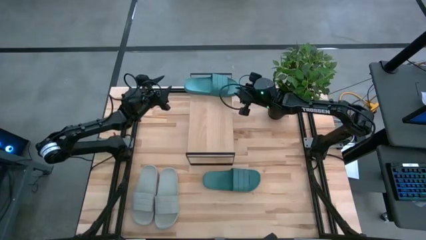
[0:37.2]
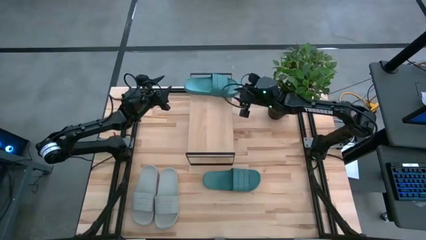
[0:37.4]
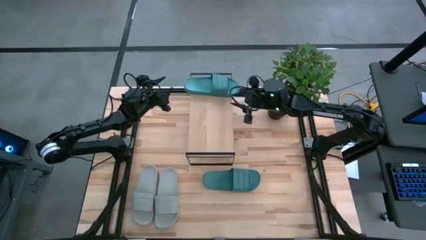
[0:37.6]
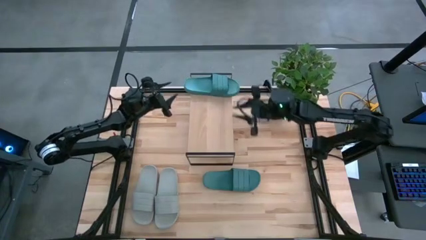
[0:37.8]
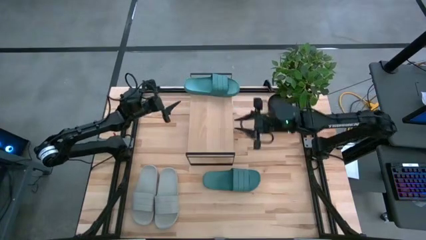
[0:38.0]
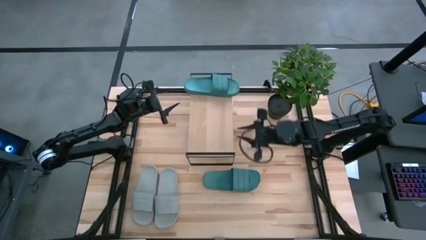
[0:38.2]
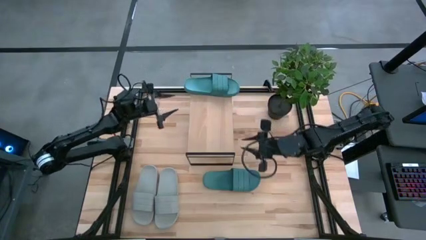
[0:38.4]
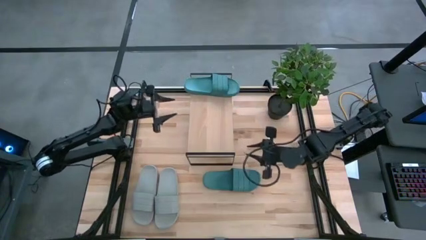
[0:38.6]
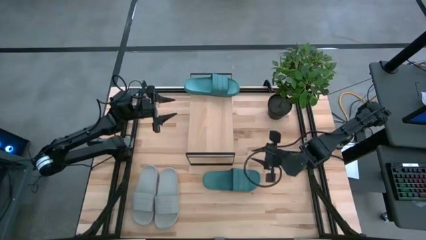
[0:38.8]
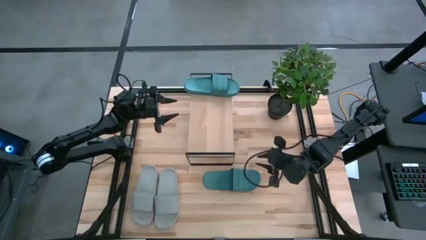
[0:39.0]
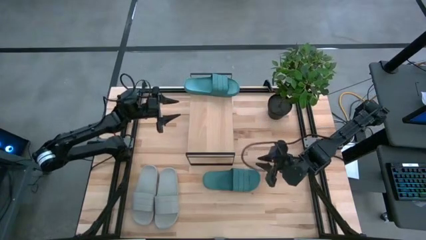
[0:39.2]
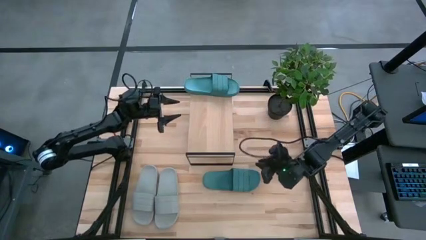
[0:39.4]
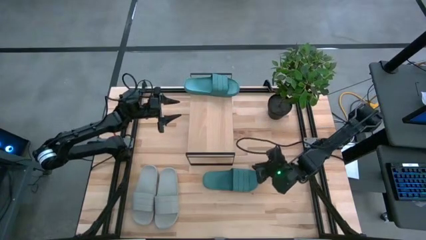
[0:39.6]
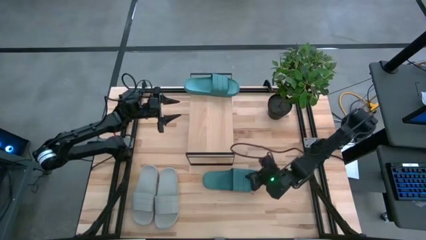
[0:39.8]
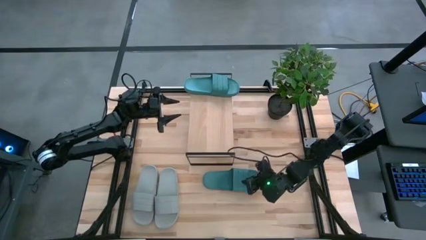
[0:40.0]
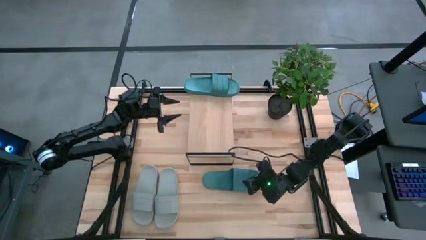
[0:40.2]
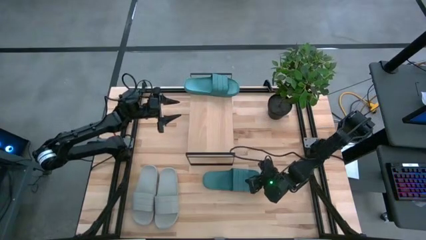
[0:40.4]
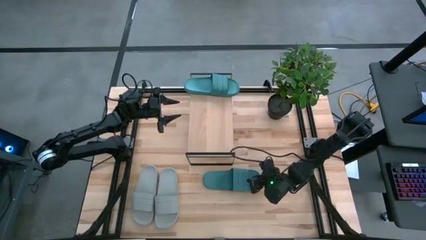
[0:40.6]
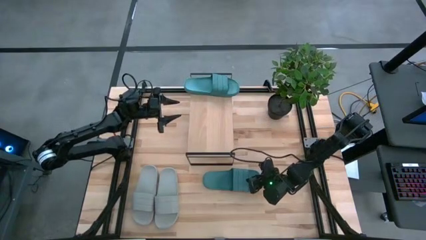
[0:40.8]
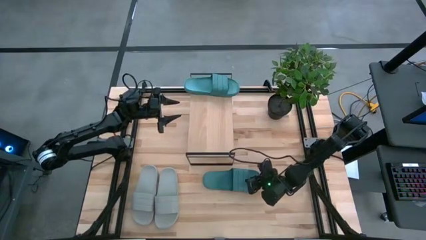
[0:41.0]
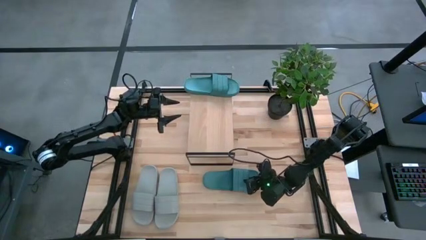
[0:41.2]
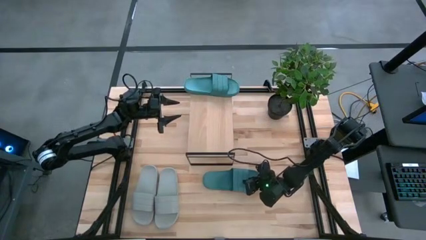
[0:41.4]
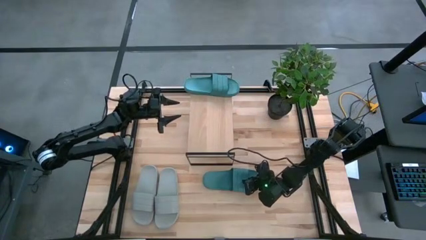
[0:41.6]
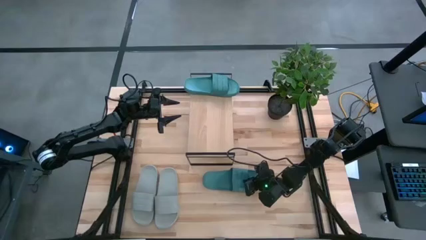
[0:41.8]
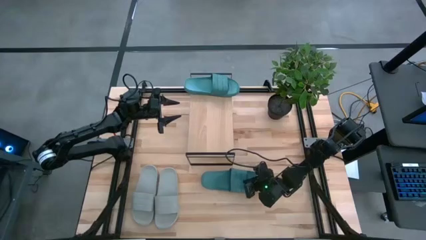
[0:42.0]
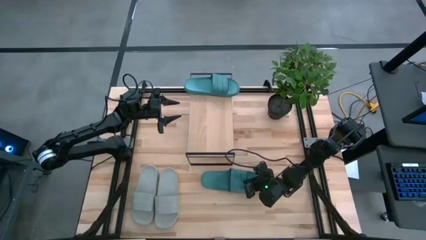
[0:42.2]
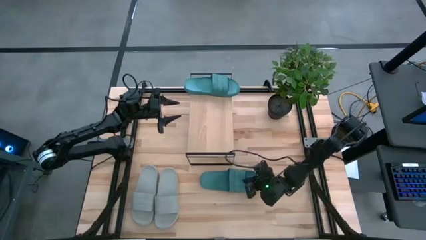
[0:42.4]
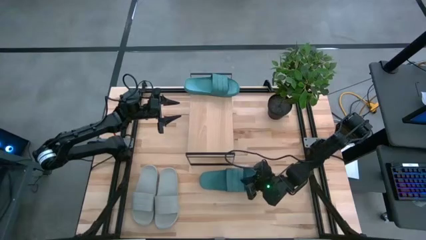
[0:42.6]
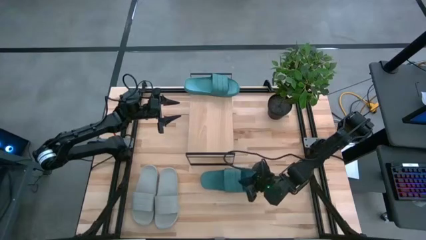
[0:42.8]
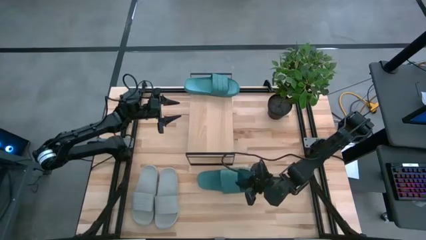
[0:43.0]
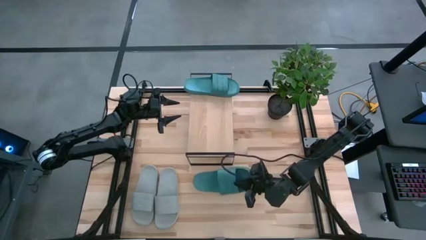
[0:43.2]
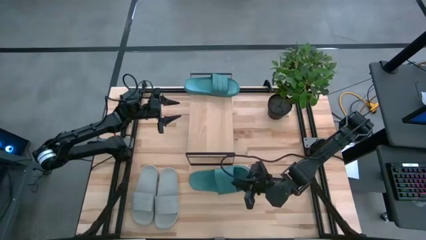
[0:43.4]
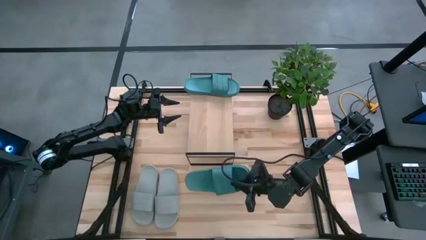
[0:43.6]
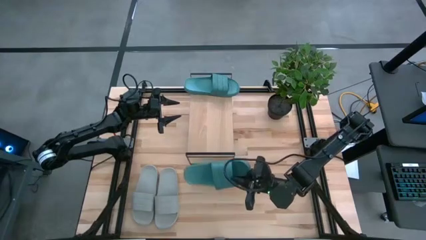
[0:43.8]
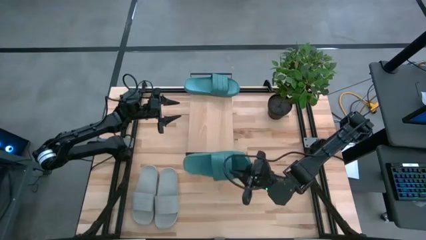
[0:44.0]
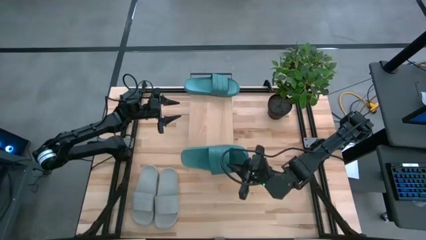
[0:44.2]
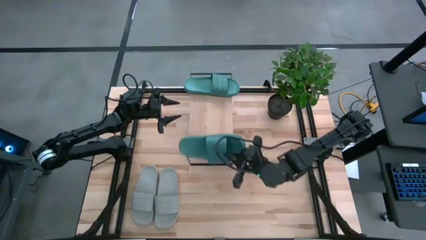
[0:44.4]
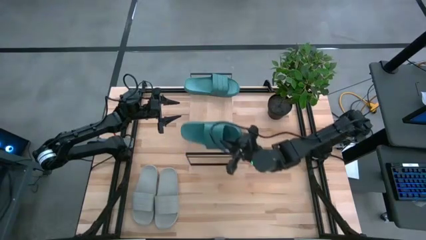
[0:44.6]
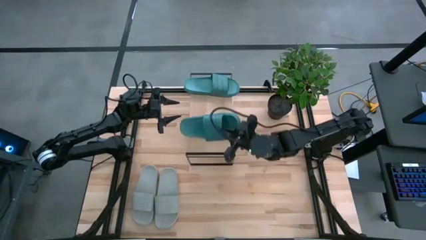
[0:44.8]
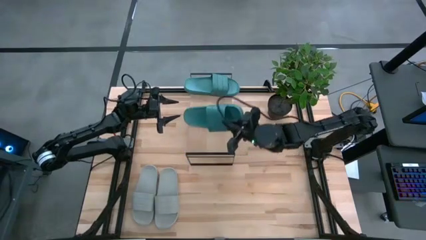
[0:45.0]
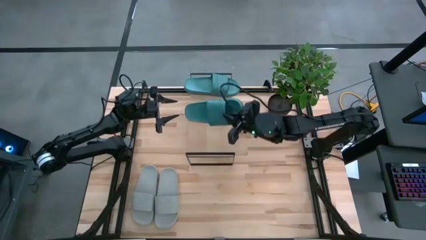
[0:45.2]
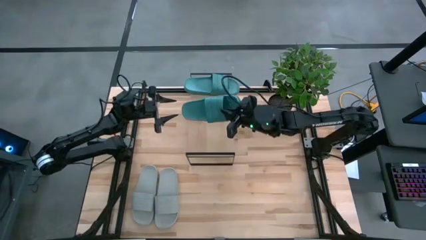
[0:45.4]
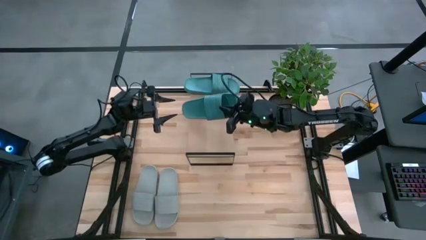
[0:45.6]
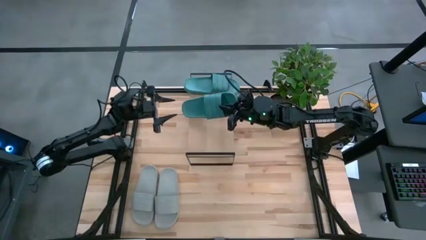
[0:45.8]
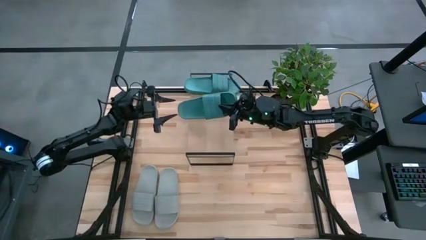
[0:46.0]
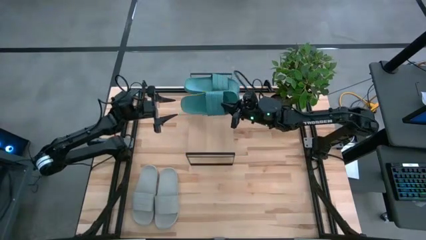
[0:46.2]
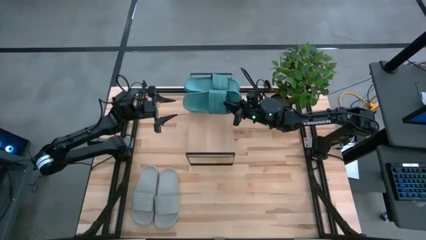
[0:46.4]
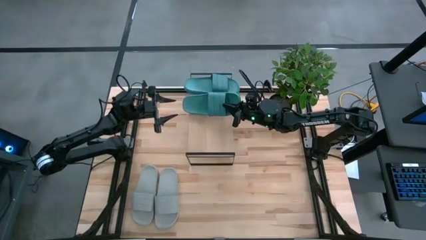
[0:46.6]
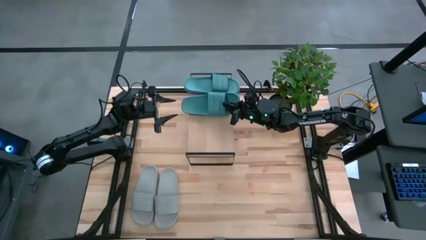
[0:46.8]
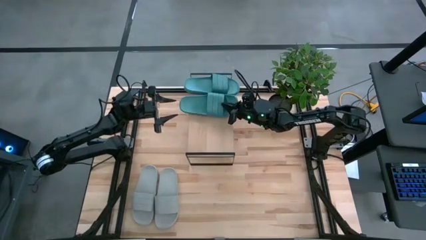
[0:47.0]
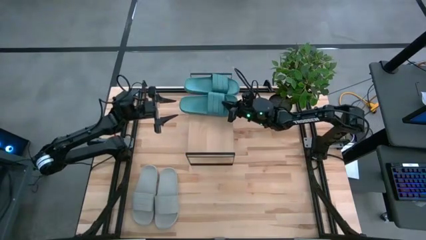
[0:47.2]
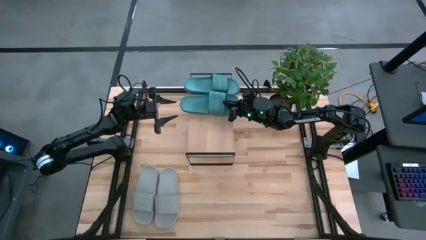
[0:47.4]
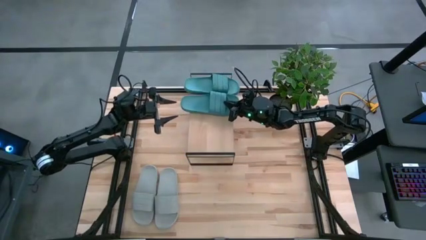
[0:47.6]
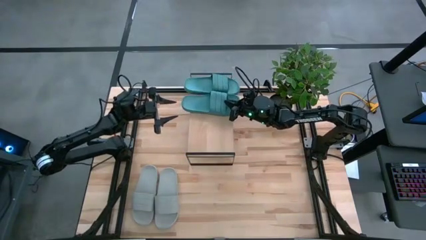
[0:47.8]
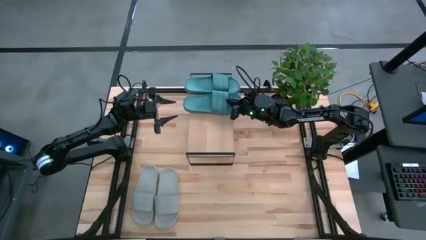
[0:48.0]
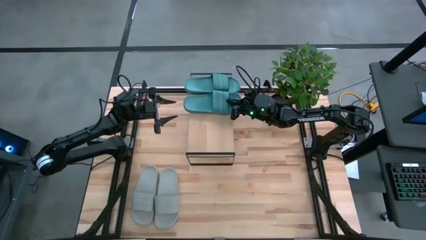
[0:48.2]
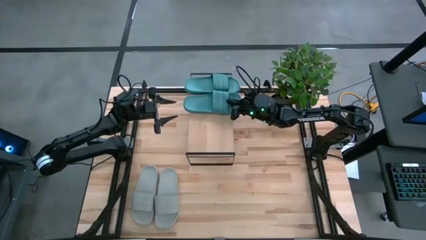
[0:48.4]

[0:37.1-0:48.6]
Task: Pick and place slides into the shelf
Put the green slide on the shelf

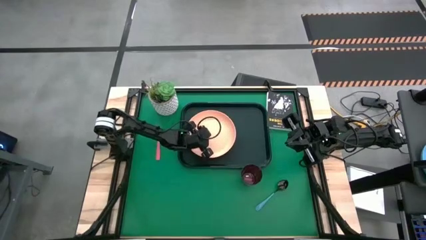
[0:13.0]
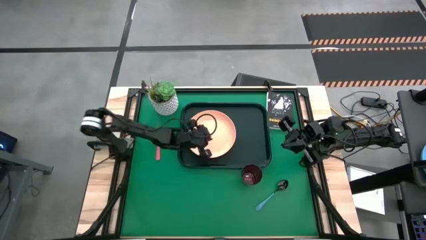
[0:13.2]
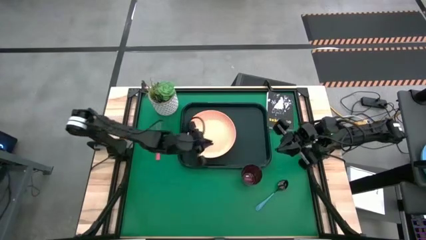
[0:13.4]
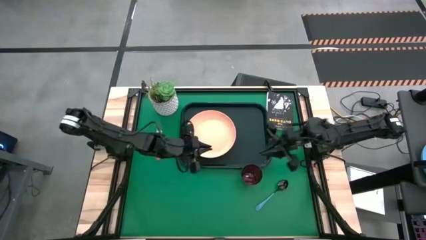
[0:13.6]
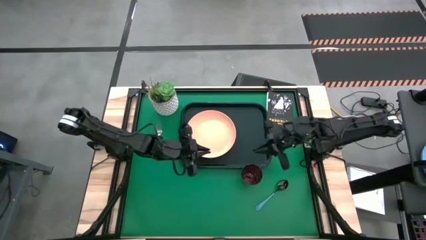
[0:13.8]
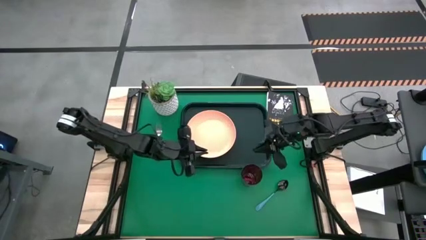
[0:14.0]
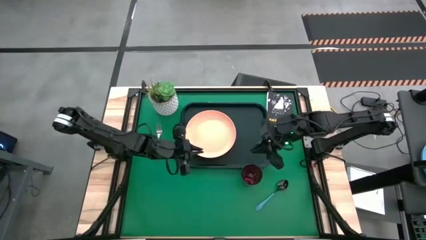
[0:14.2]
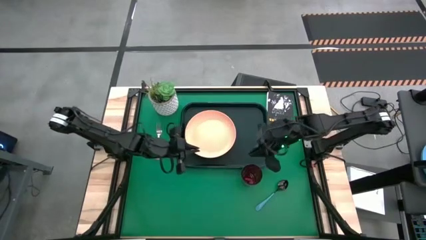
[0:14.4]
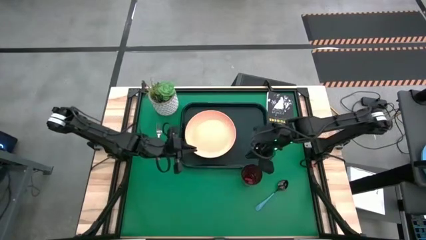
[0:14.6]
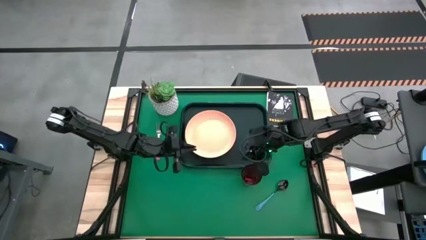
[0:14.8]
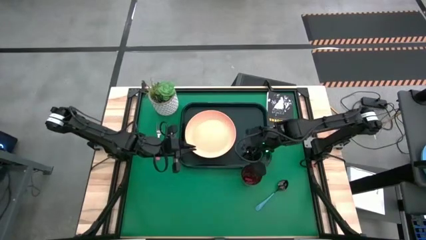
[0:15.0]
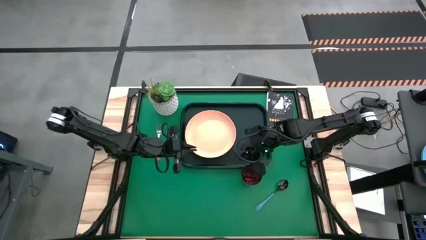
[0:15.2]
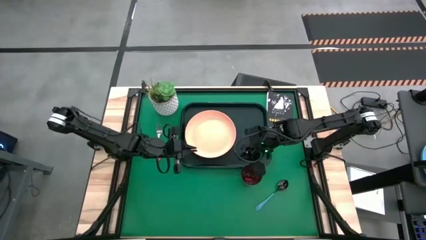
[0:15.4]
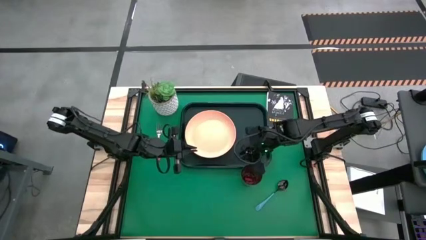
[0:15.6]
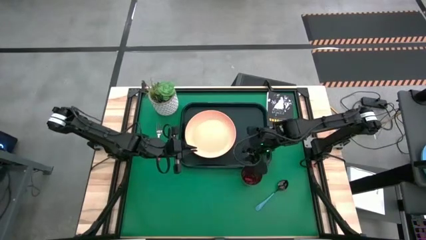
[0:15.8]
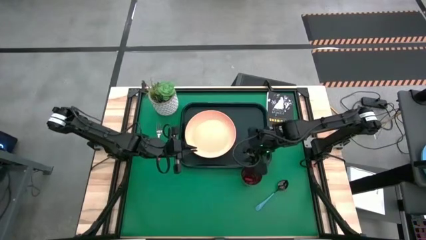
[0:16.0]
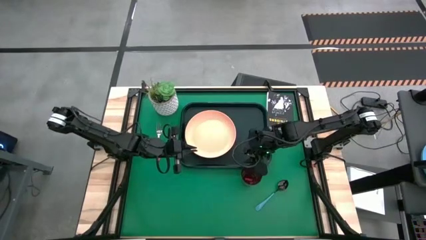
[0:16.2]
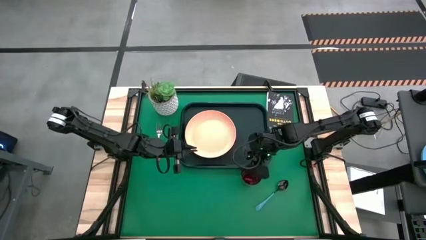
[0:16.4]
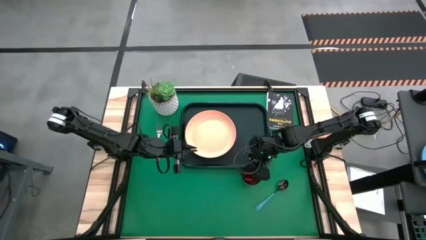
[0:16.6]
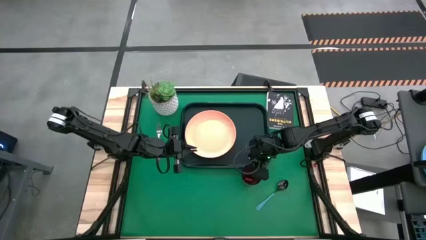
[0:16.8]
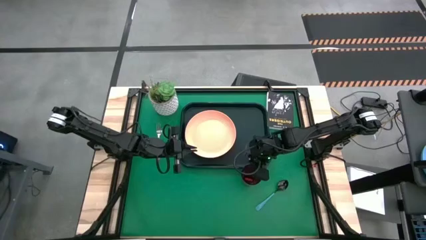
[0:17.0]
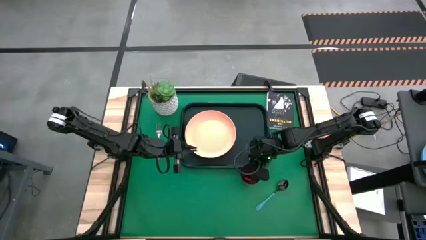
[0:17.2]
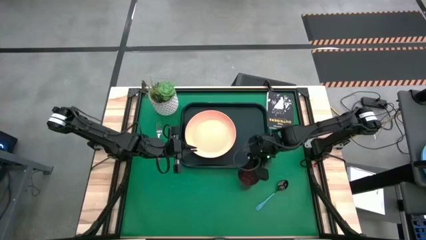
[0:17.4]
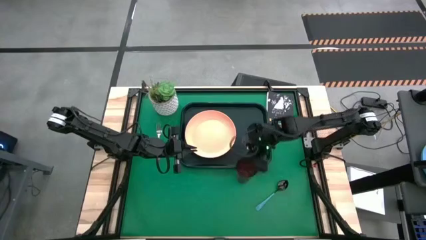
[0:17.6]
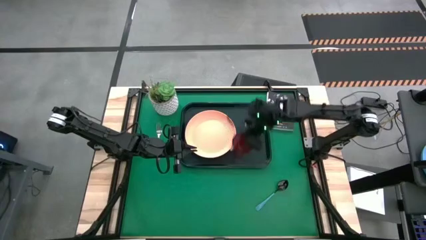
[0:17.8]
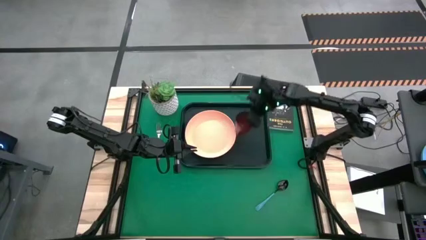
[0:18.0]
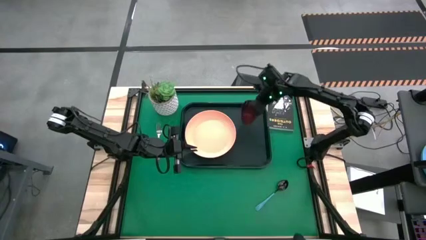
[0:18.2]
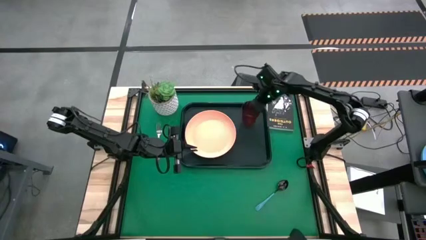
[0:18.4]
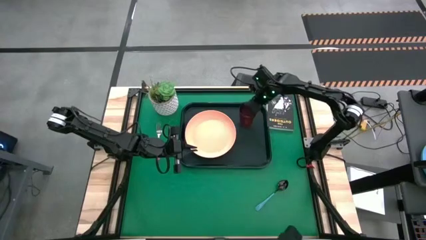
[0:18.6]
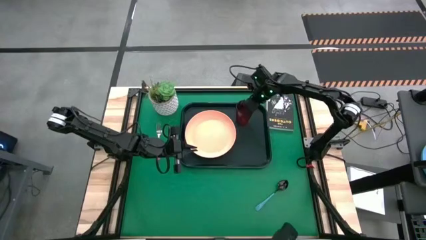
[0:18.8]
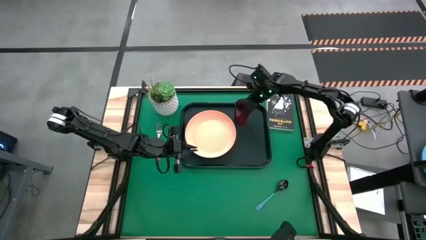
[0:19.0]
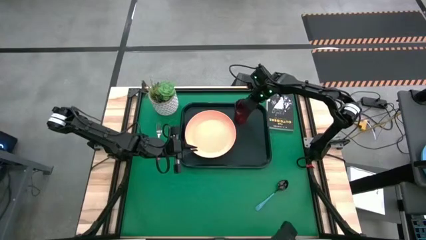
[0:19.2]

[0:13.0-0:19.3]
Task: Pick and place plate/cup/fork/spoon on tray
Put the red cup on the dark green serving tray to the top right of the orange plate
